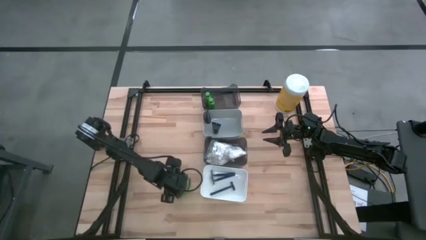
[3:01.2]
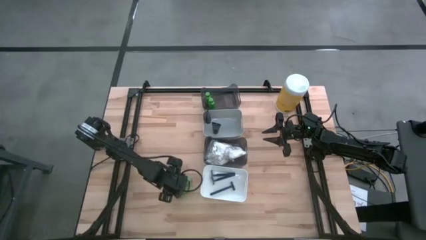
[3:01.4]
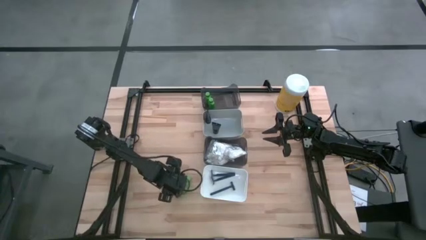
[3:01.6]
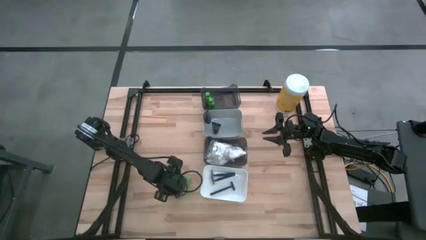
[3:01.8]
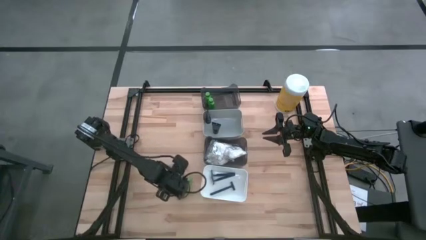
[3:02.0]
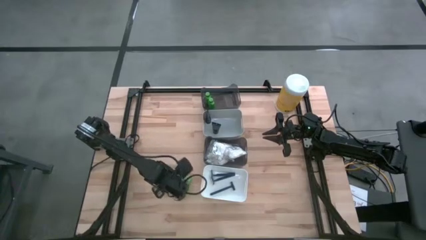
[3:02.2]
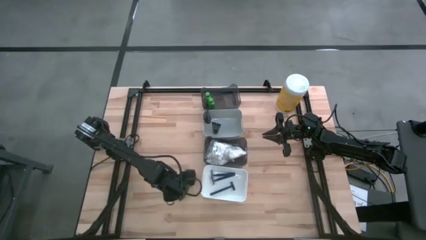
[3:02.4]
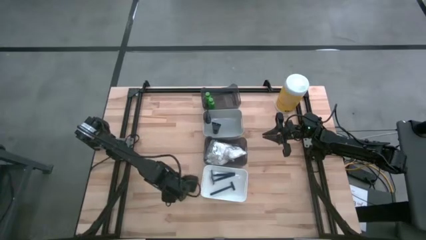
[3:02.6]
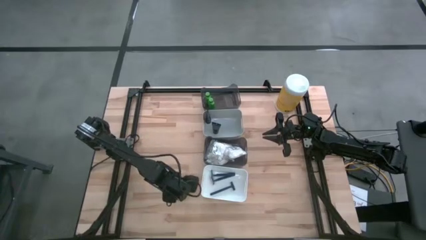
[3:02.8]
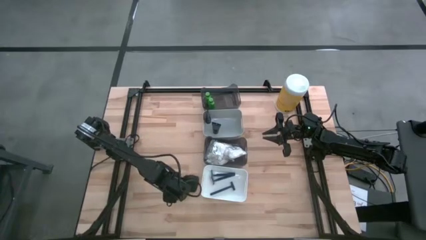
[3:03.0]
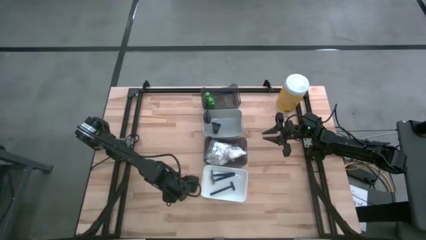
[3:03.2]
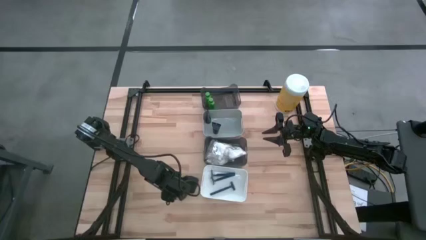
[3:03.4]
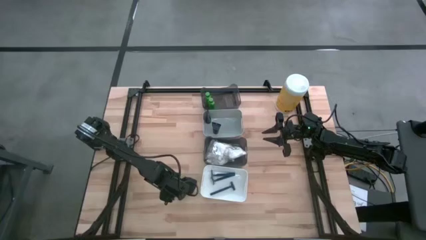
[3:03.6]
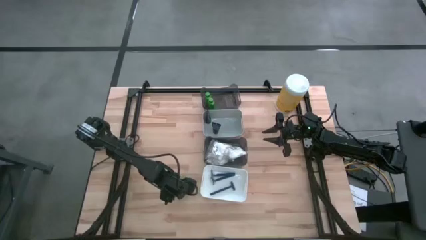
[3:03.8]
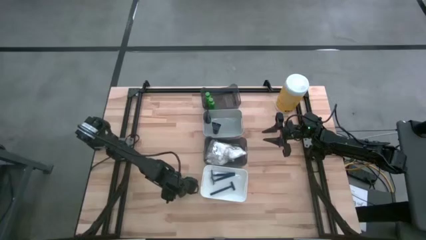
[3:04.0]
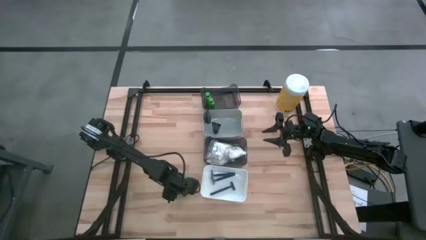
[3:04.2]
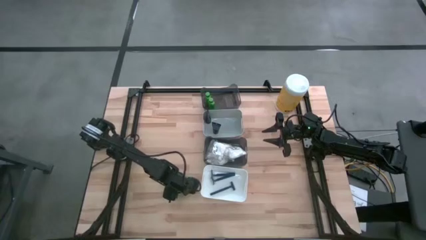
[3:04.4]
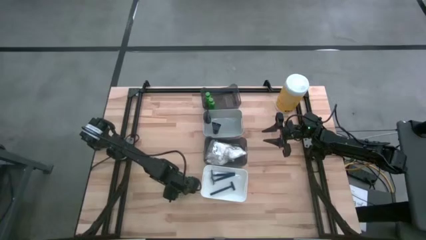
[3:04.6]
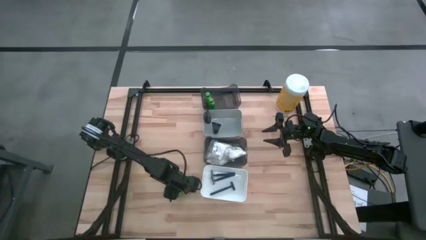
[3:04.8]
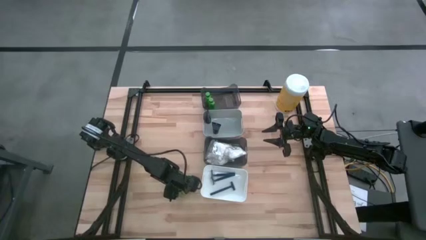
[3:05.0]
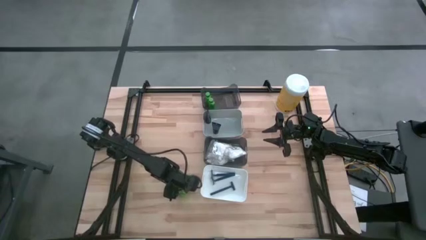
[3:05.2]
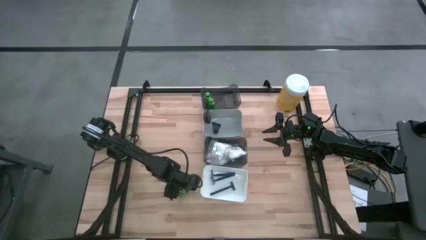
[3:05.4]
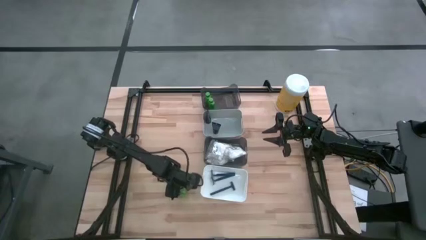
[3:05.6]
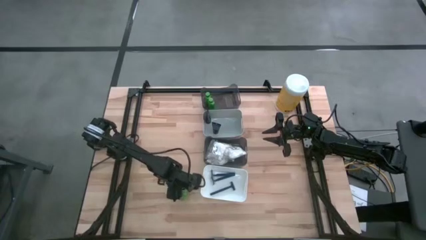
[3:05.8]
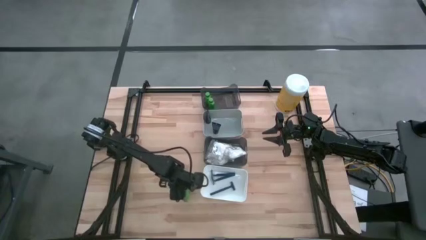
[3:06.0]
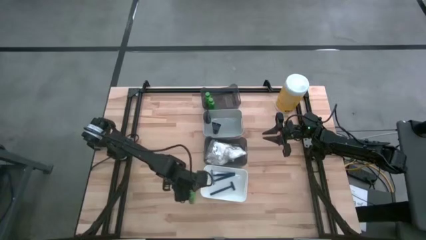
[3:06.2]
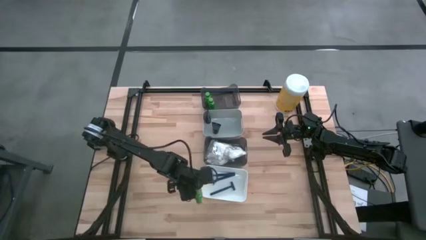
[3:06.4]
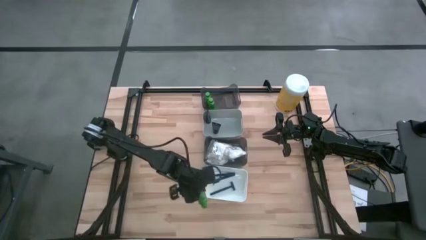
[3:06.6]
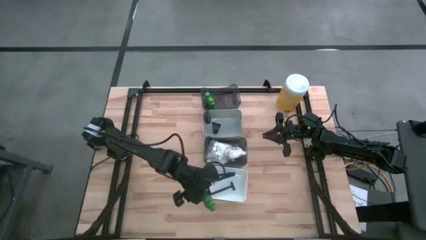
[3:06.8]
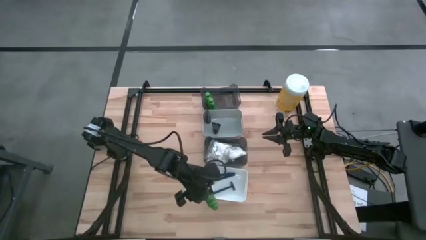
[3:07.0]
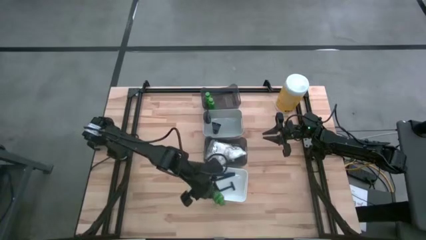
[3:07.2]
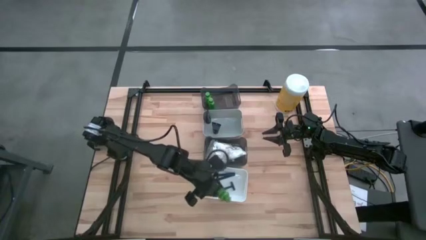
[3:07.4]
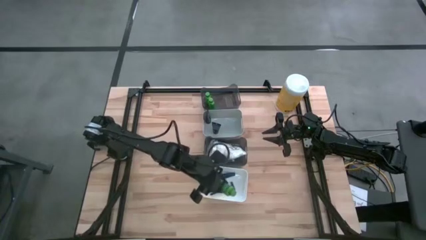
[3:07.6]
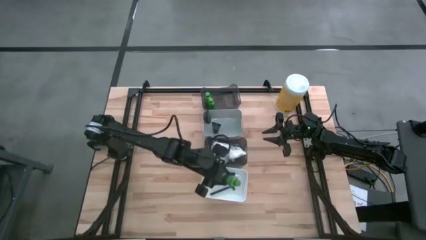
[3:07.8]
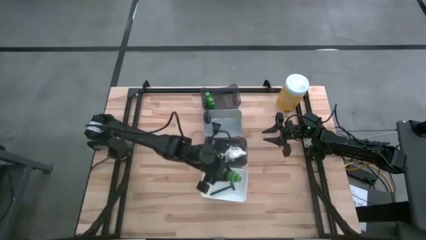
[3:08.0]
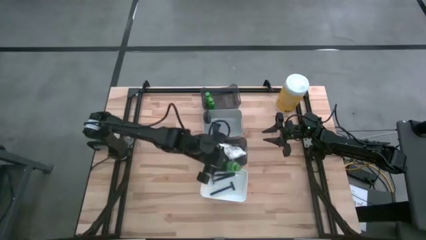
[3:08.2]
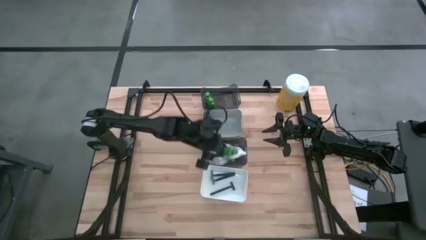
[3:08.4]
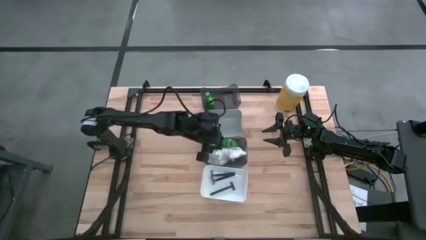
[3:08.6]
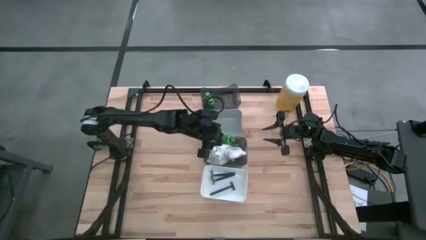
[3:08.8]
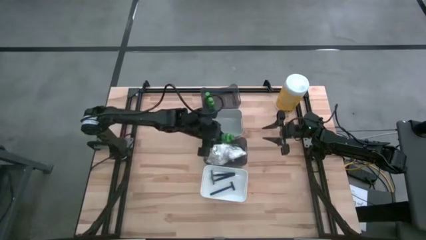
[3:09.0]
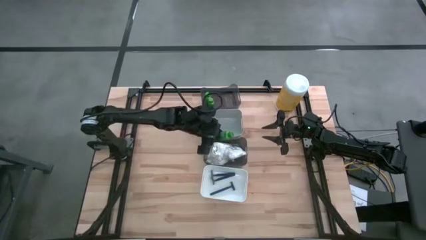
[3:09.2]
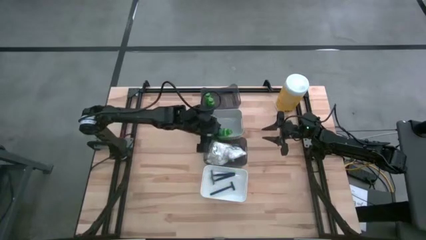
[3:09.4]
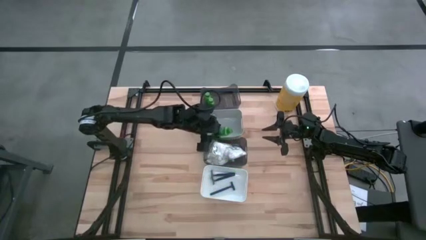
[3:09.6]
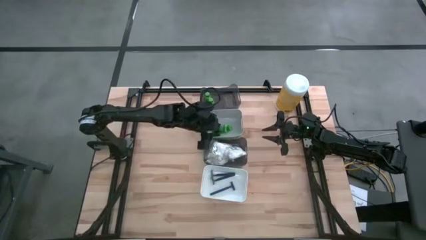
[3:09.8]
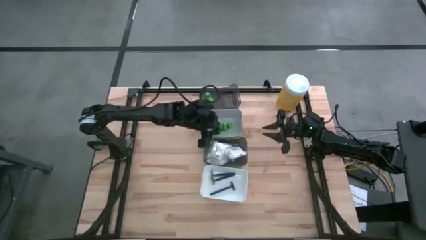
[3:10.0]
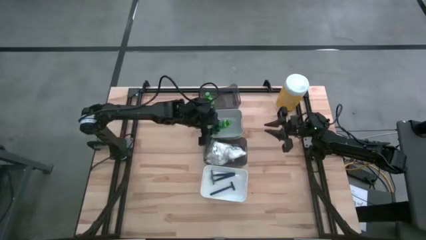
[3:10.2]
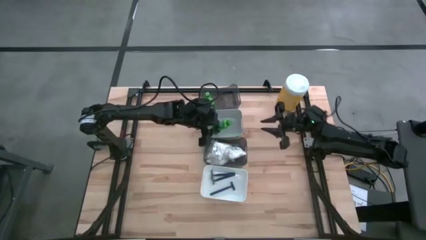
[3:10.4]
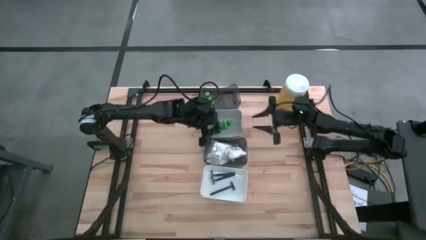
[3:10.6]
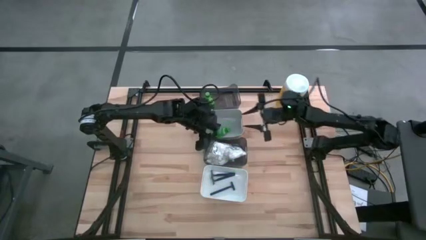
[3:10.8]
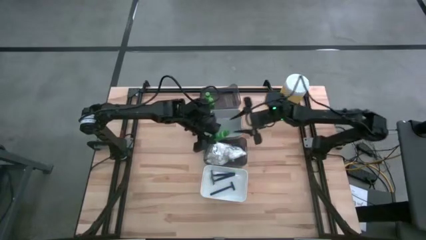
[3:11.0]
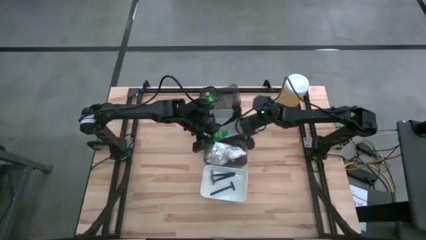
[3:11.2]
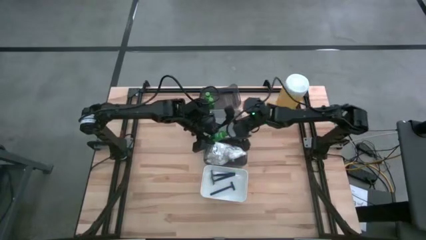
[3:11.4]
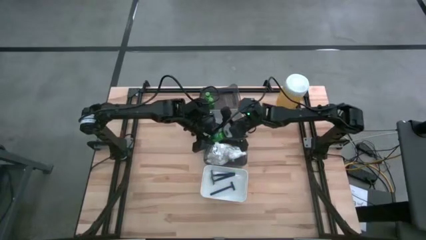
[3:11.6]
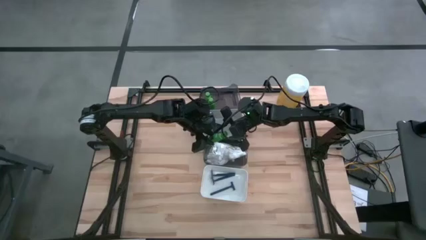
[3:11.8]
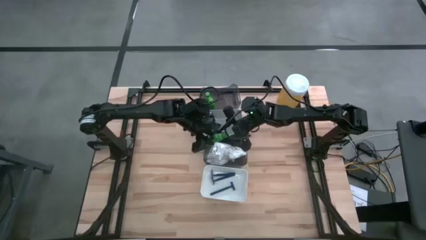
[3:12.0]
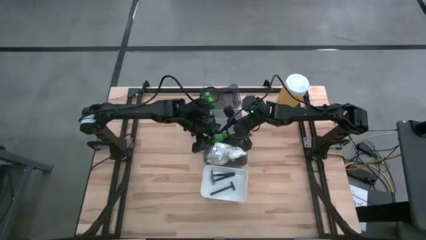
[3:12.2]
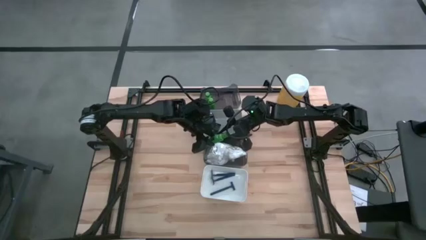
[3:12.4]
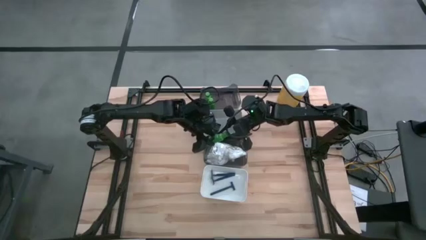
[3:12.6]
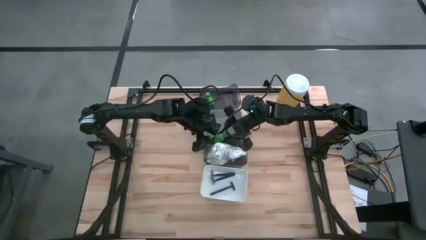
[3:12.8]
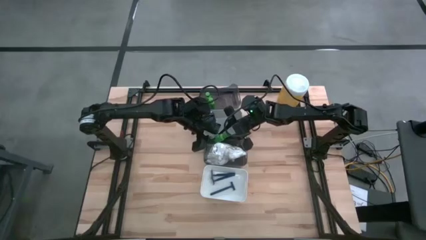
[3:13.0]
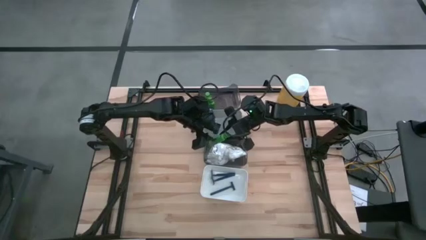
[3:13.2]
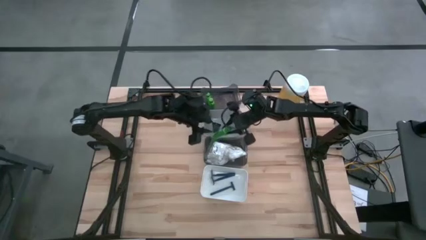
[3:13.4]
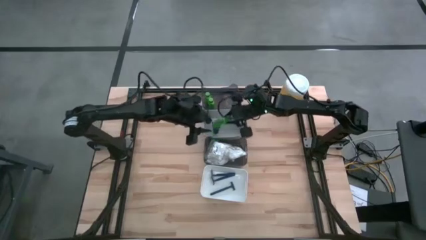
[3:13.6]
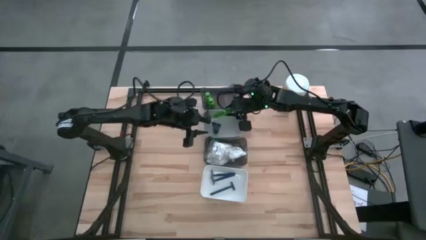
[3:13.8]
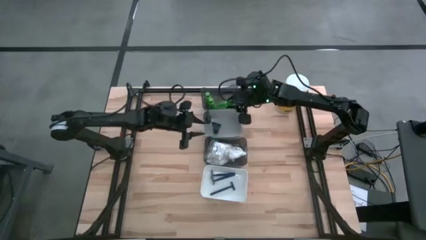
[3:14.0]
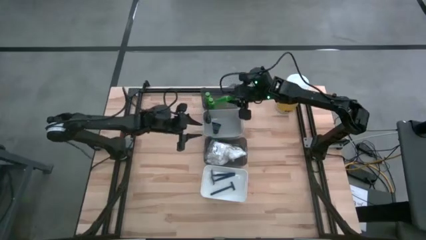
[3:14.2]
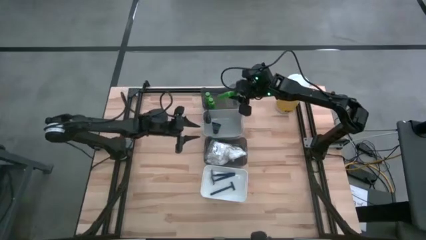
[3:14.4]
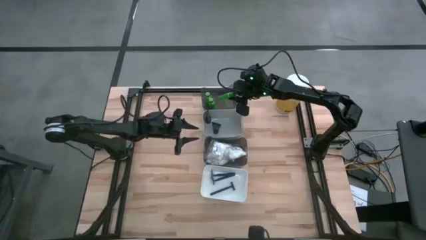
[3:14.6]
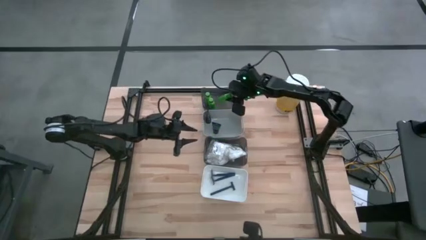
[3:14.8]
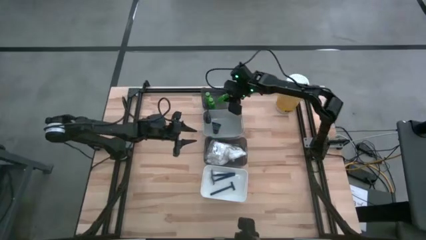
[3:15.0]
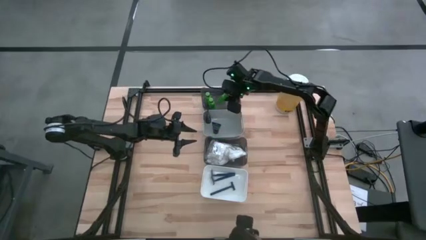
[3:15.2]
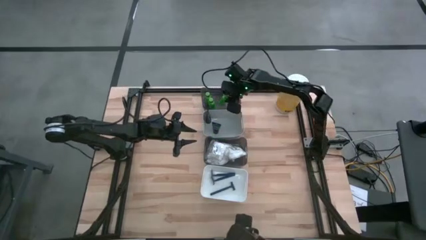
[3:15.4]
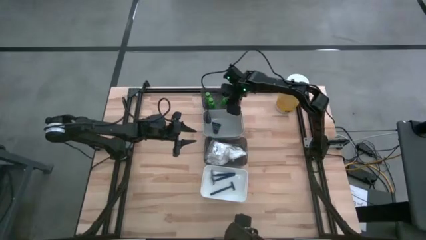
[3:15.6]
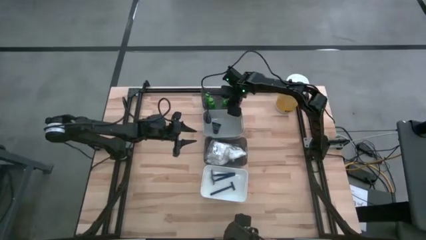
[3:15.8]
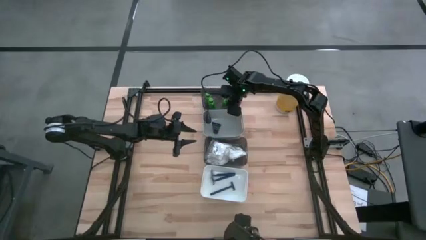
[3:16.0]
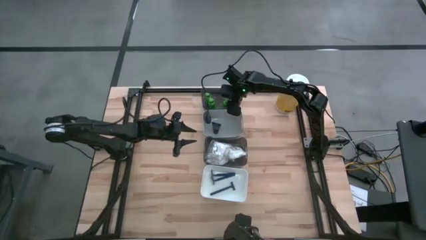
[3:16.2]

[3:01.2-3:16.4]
Task: Pick & Place Travel size toiletries
Put the green shampoo into the top black bin

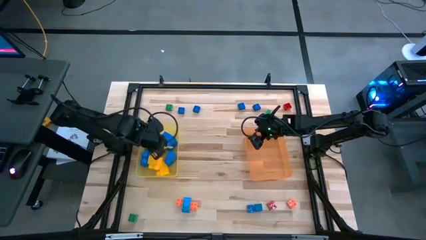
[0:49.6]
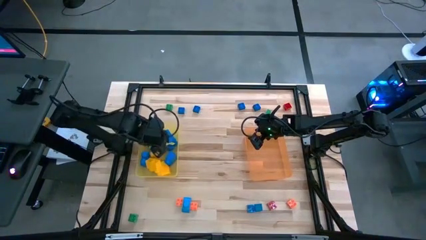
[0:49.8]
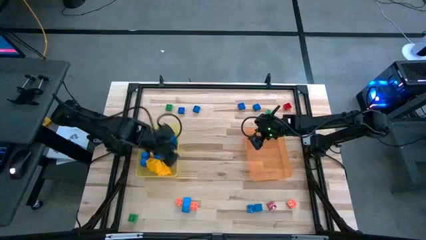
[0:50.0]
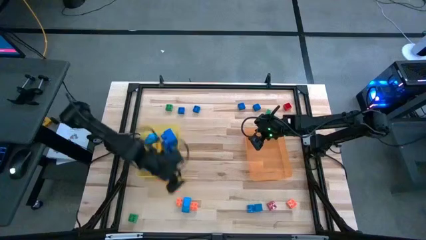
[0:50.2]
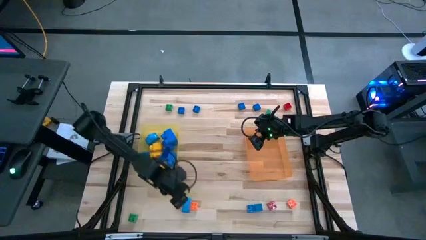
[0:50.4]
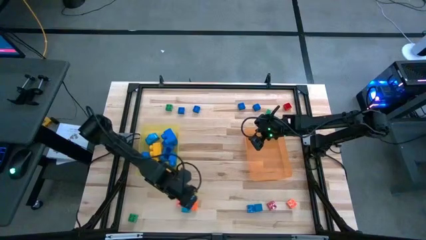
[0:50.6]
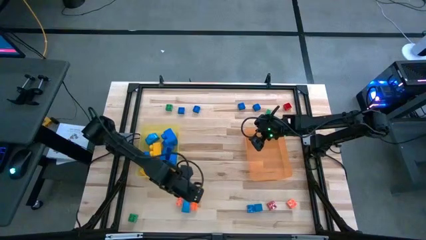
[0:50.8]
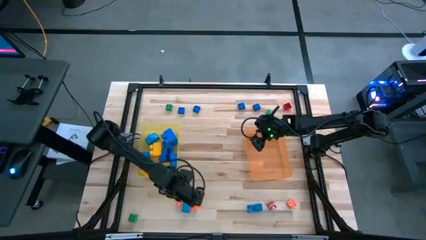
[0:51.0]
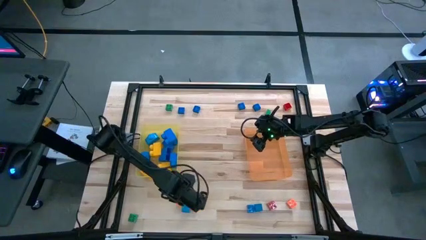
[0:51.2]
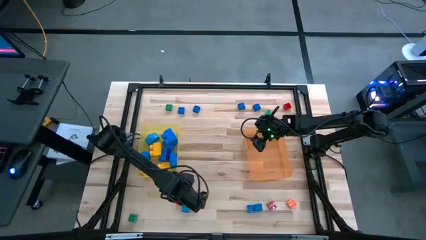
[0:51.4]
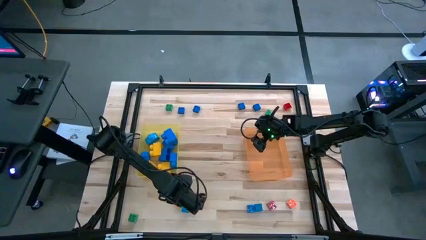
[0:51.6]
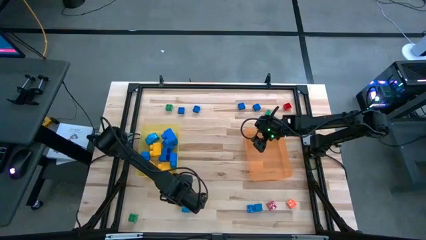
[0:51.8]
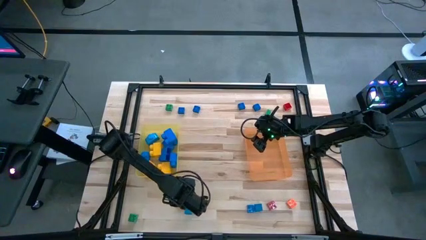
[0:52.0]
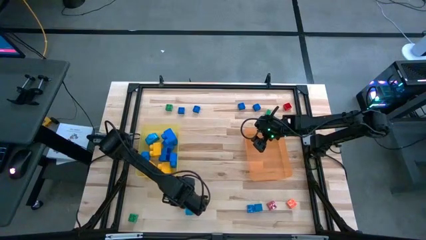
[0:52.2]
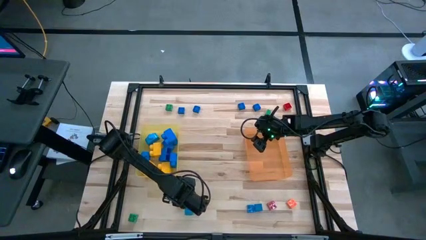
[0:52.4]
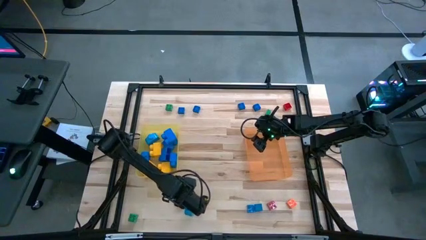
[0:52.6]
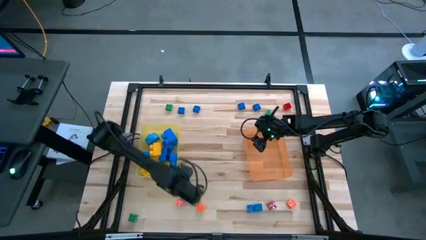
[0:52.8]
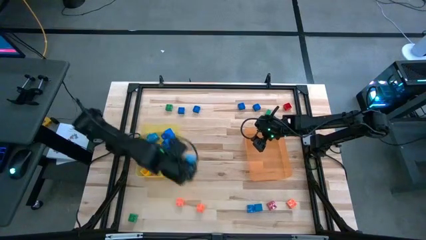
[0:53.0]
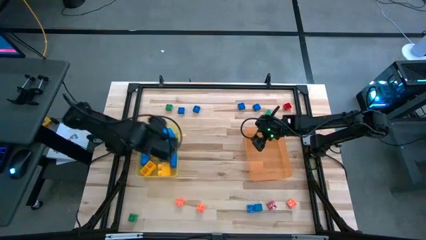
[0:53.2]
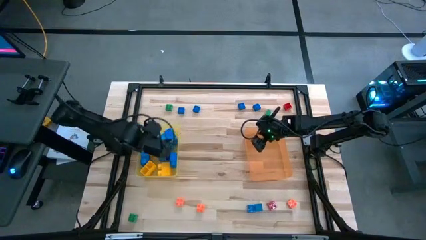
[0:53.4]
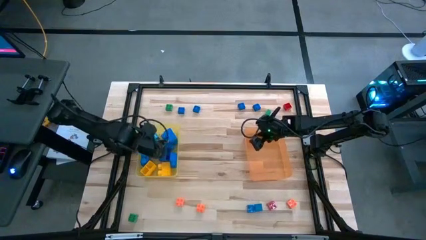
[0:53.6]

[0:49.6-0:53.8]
Task: Sort blocks by size
Put the large blue game piece into the yellow bin
